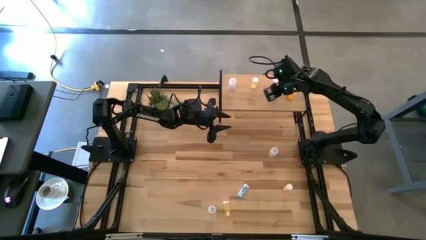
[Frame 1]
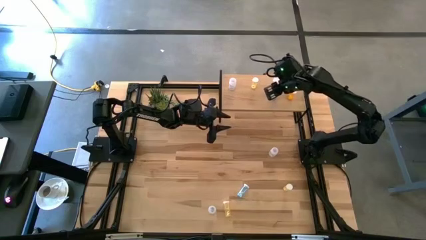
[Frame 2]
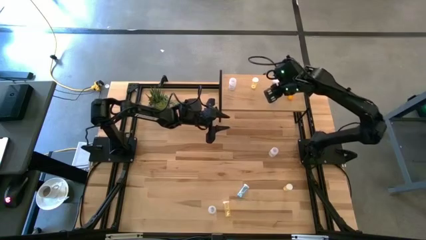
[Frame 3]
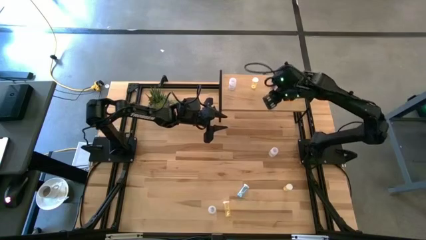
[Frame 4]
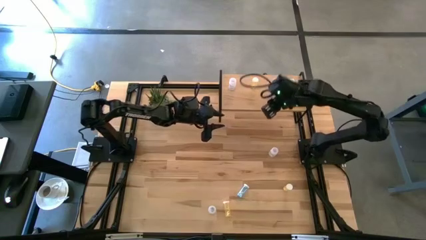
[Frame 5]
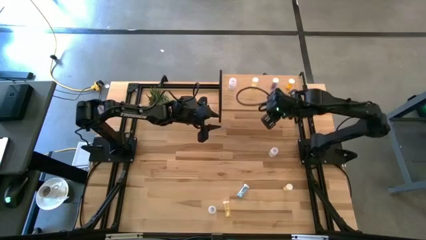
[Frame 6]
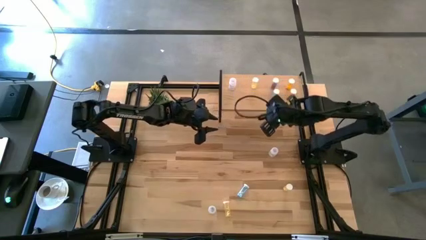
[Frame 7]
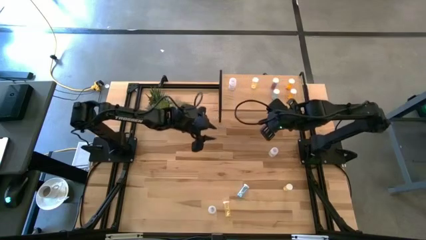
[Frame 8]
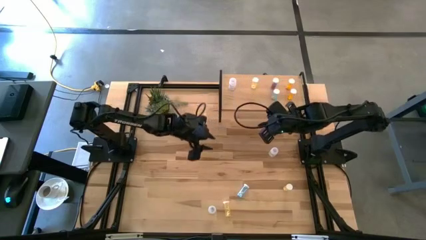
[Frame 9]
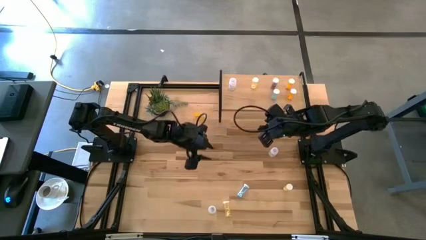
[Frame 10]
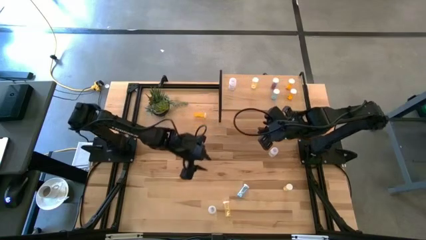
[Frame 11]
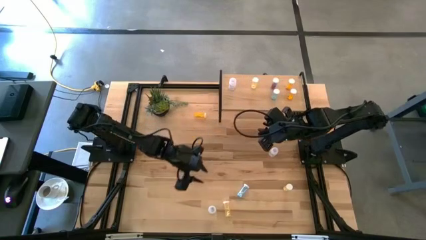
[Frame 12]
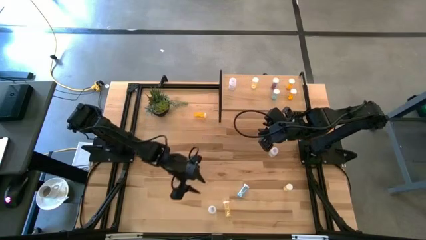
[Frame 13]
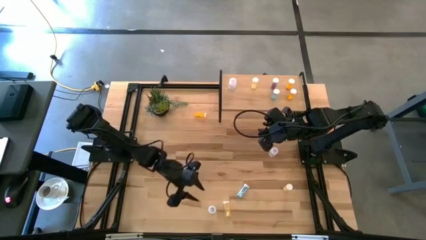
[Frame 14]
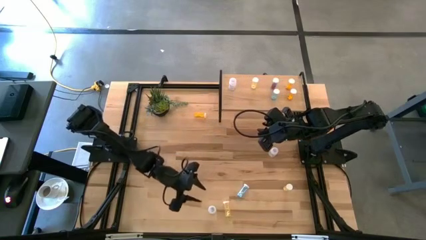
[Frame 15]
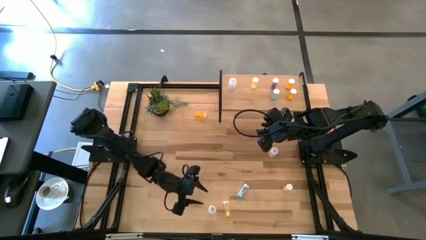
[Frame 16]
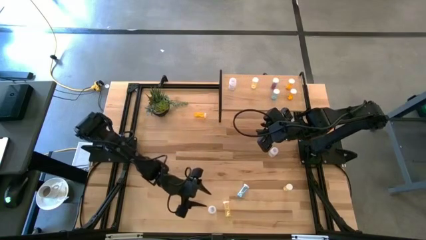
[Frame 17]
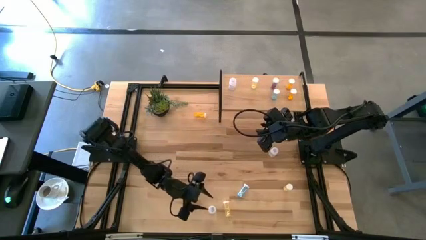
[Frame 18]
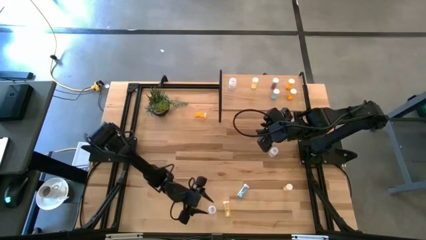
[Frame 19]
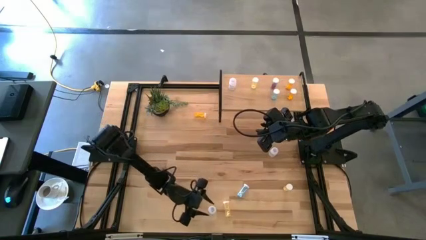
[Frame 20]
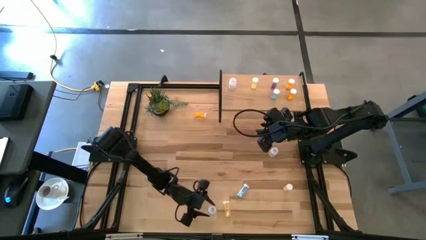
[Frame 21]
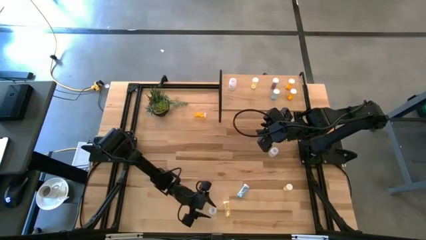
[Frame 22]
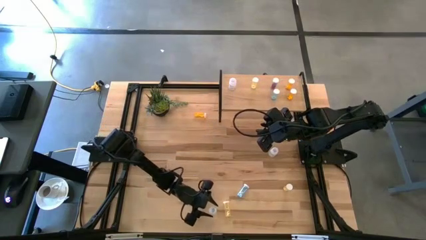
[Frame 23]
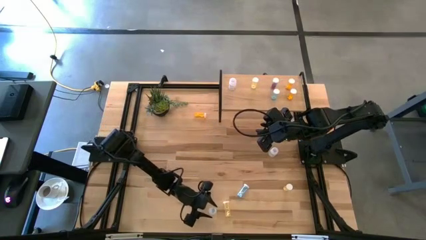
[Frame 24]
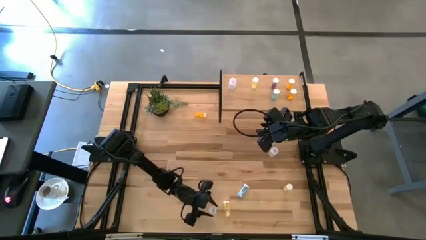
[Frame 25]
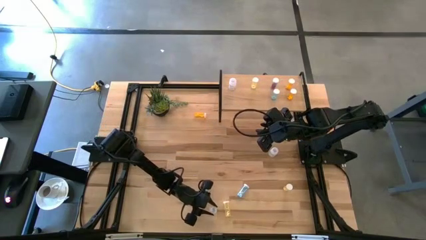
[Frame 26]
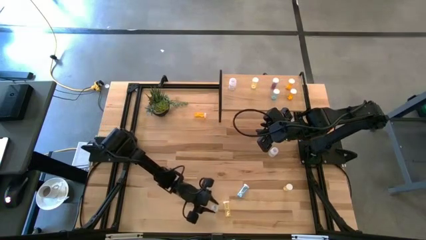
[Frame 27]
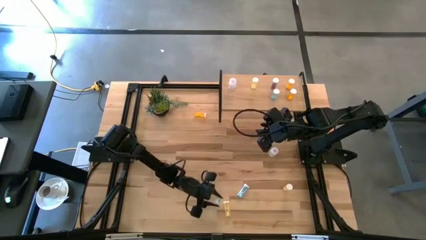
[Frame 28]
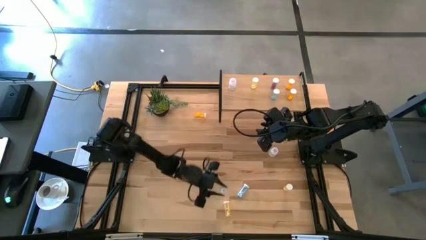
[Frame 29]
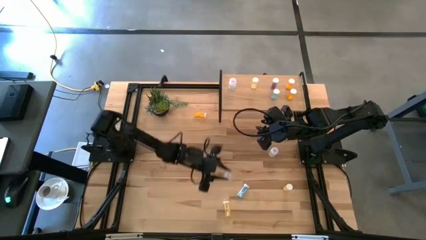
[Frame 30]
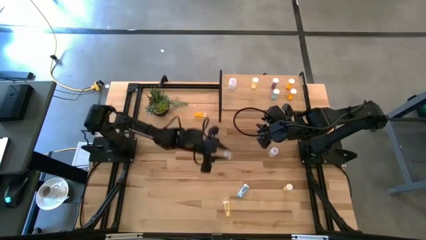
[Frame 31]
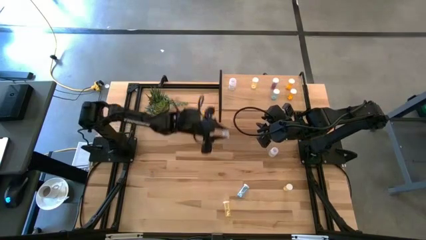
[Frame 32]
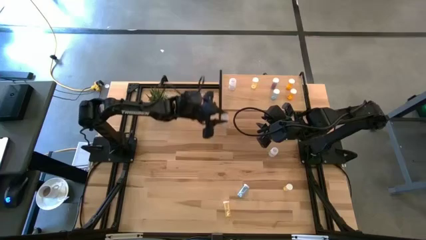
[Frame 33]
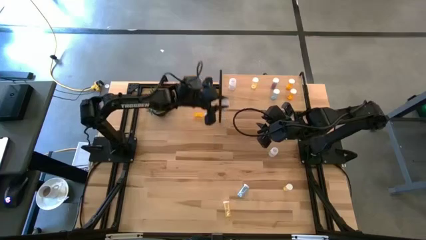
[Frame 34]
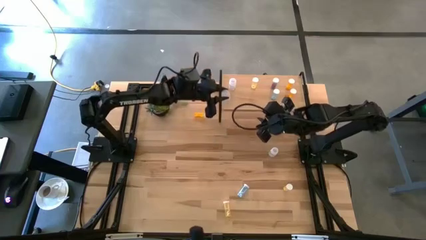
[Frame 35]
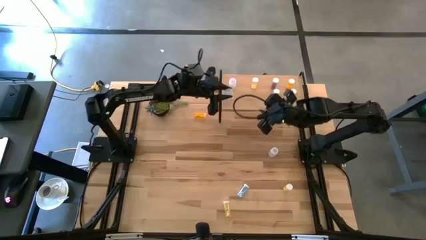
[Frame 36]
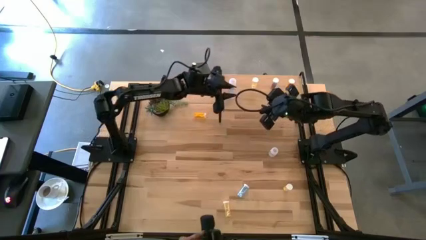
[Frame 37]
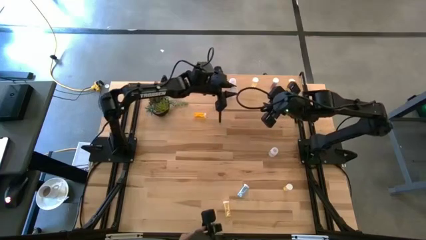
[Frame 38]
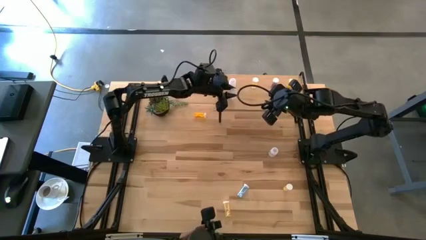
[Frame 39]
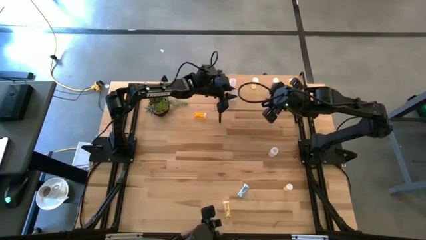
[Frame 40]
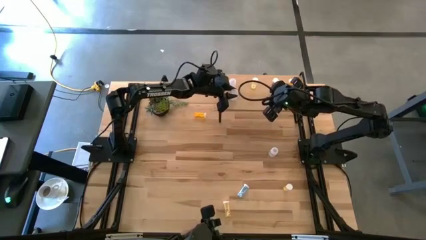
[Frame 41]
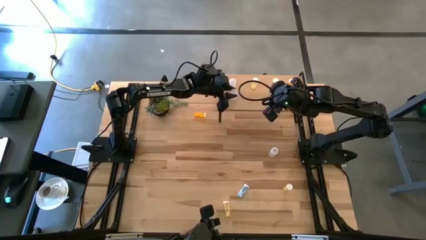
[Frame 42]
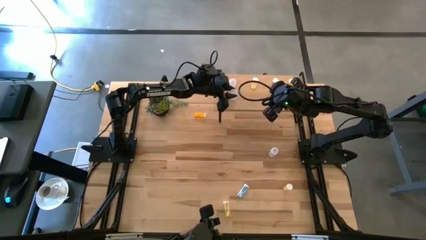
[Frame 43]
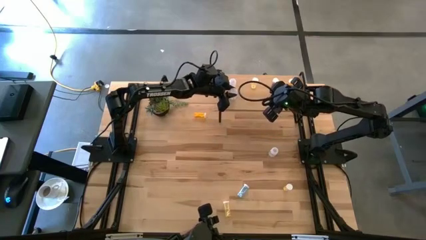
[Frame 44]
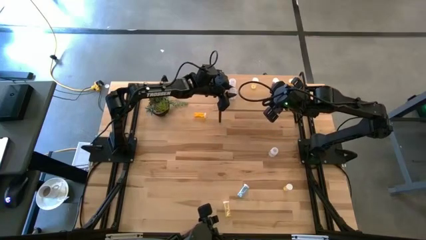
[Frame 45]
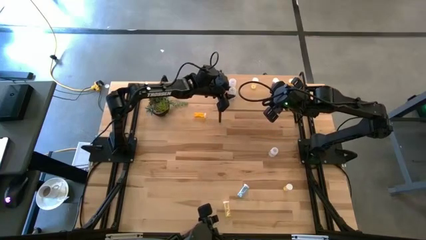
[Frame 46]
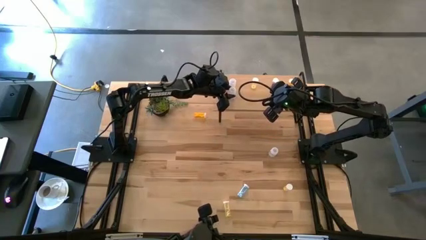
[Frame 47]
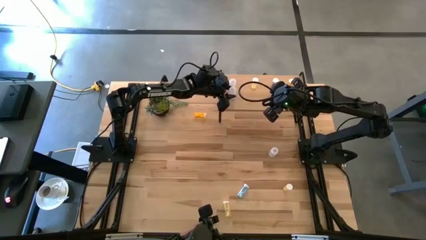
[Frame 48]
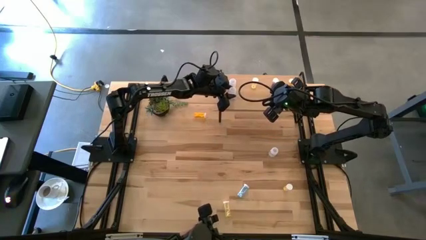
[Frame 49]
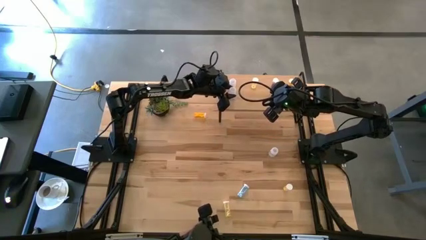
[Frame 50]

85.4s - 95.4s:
Task: Pick and place medicine bottles onto shelf by color
Put the bottom transparent pill bottle aligned with the other transparent pill bottle on the shelf

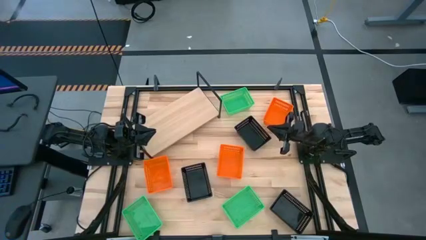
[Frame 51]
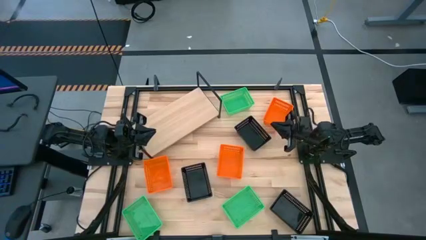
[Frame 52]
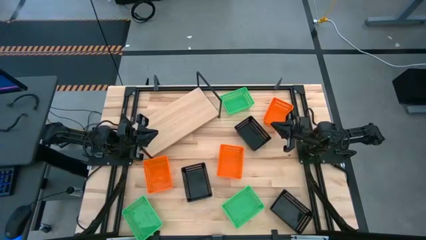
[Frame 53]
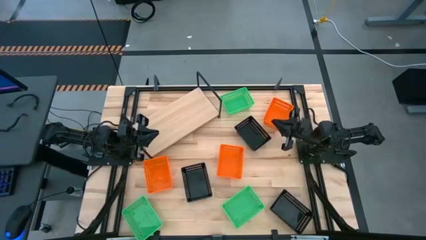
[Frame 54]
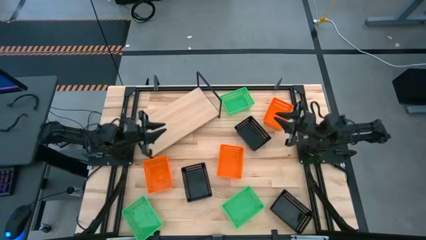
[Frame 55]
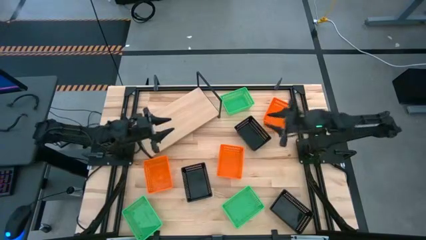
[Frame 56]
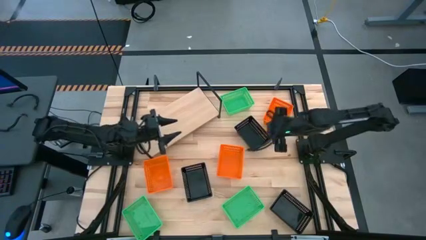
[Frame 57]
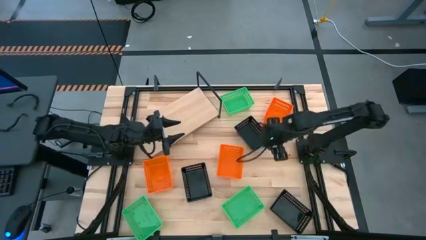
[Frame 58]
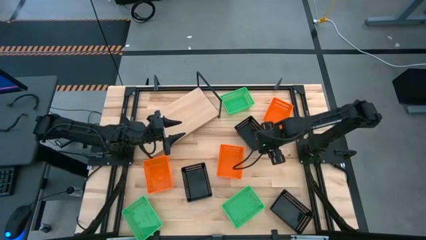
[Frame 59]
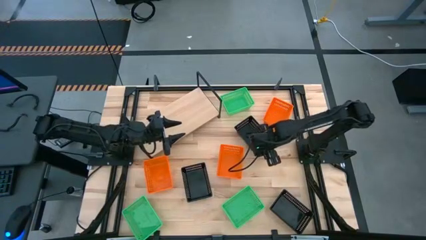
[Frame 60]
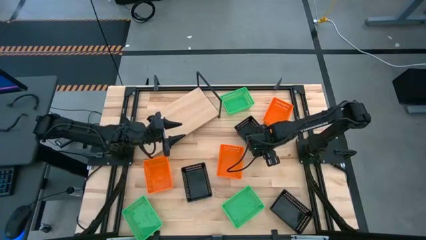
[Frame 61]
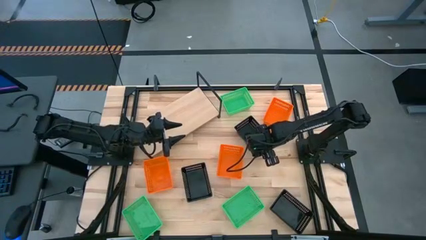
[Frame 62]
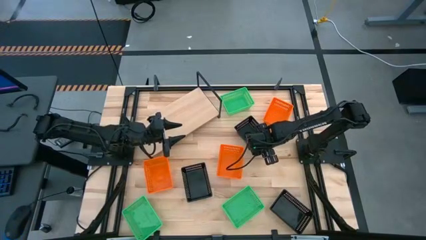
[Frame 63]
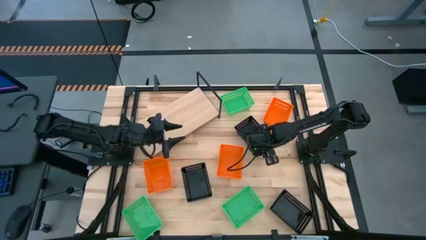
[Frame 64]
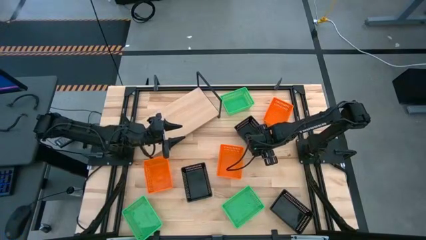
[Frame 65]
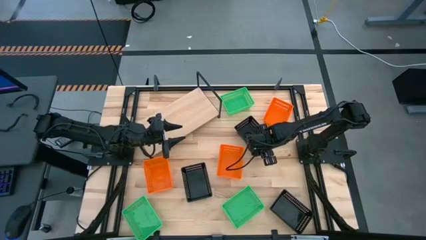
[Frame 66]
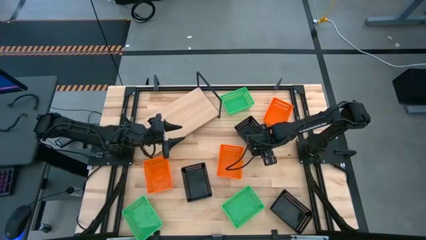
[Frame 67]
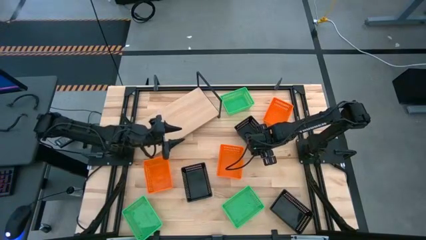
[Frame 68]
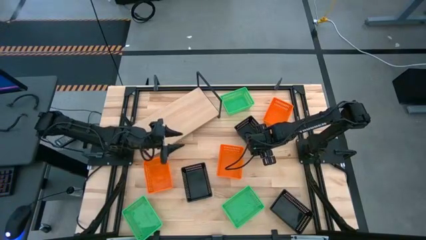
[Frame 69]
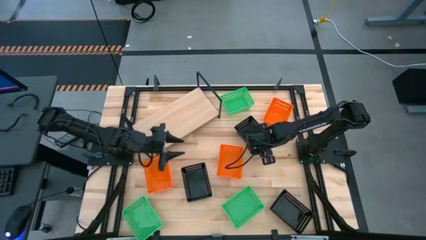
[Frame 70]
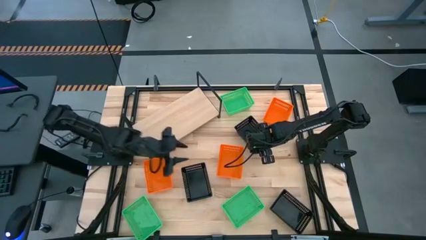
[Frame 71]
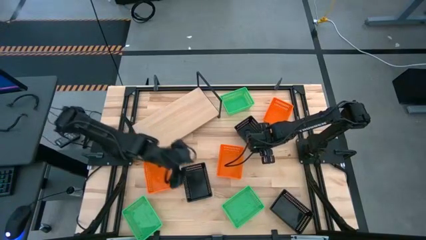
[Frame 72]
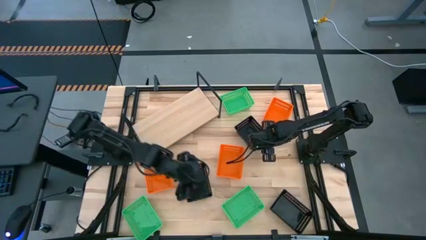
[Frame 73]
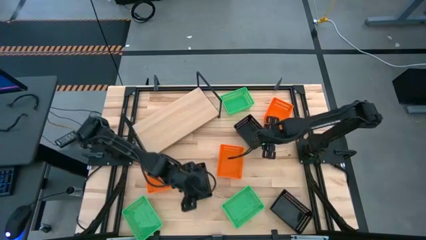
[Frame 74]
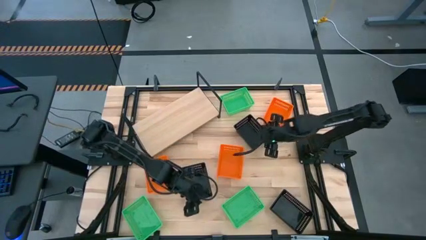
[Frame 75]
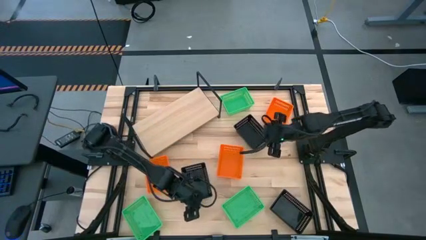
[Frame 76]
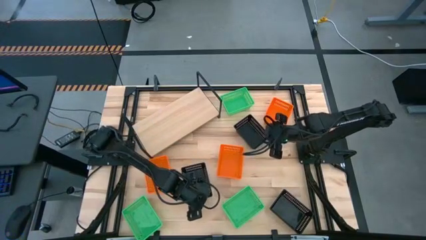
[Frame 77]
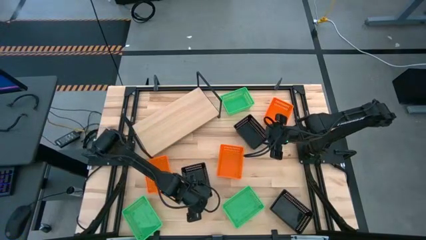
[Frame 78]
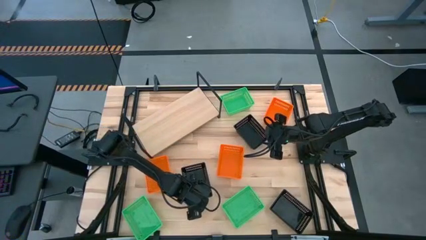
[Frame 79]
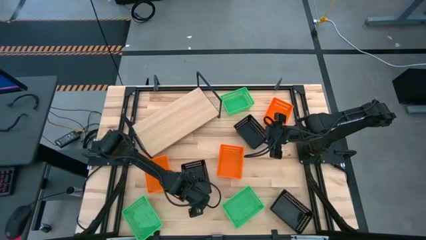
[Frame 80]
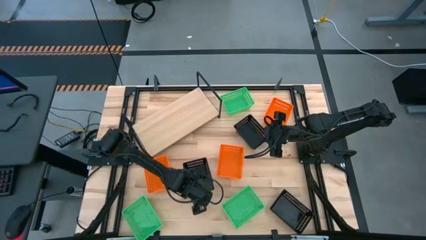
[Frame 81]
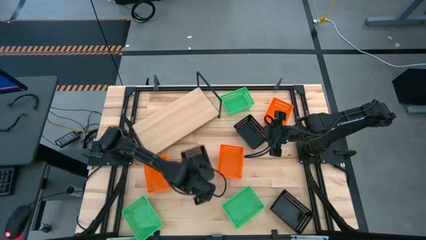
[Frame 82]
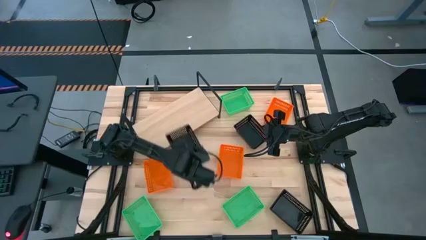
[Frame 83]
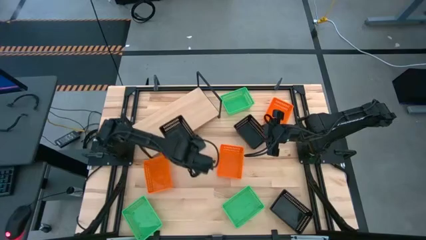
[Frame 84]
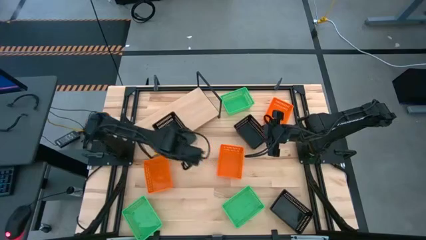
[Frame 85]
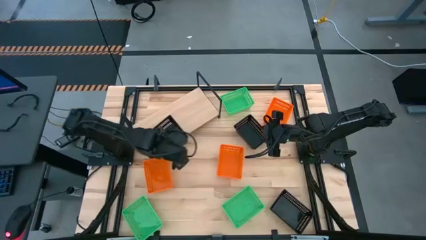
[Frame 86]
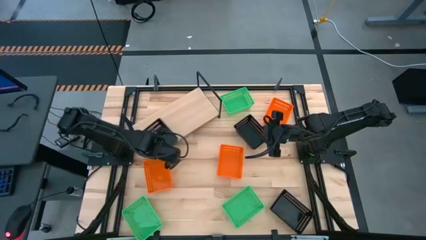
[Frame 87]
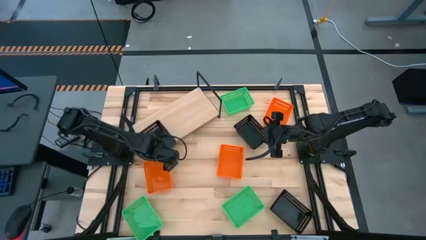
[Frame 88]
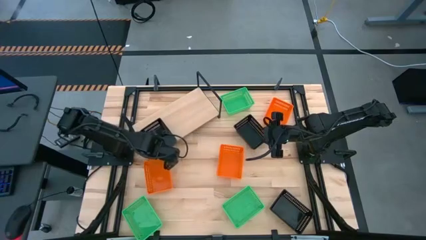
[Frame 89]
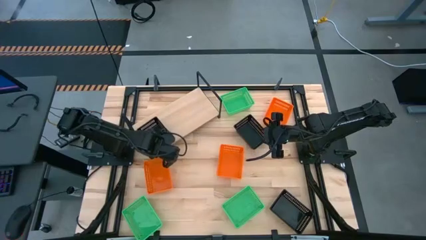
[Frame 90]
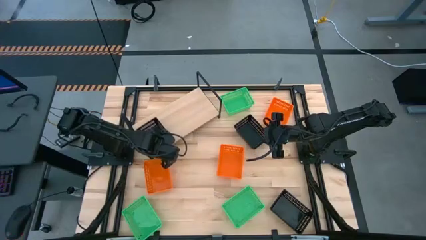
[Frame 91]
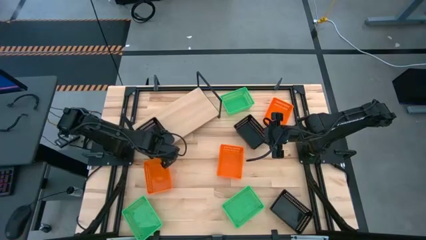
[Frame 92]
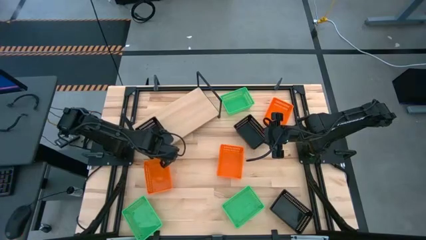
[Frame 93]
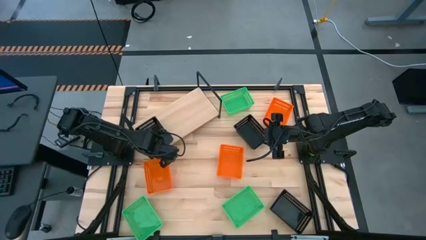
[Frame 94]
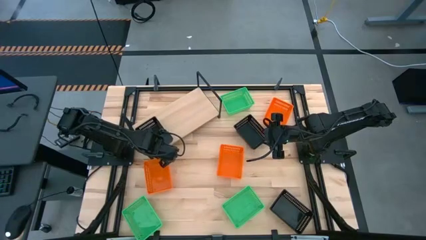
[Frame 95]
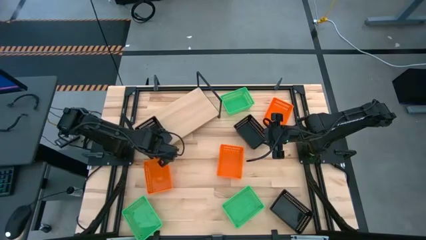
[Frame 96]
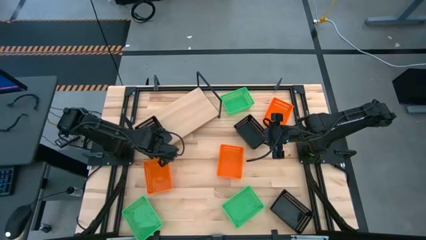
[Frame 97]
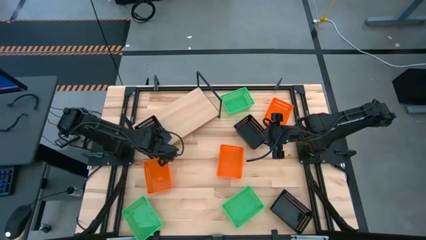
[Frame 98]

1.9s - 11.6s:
Task: Stack baskets on shelf by color
Put the left black bin on the shelf
